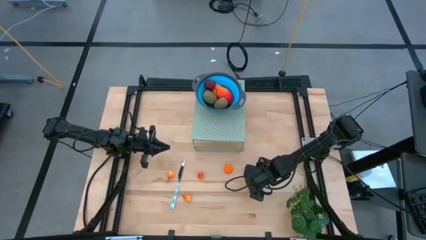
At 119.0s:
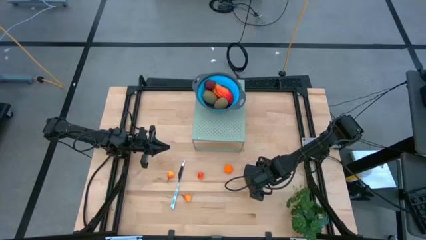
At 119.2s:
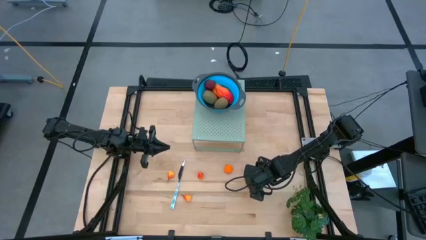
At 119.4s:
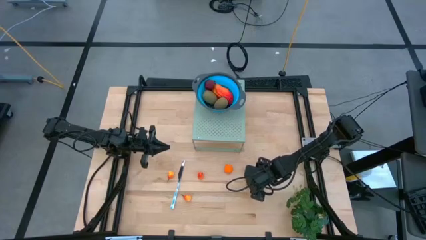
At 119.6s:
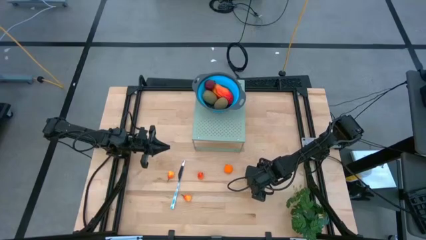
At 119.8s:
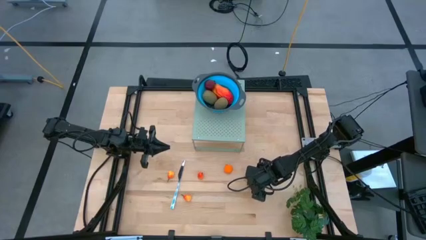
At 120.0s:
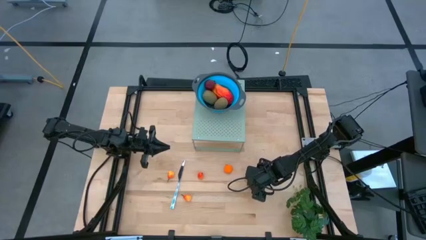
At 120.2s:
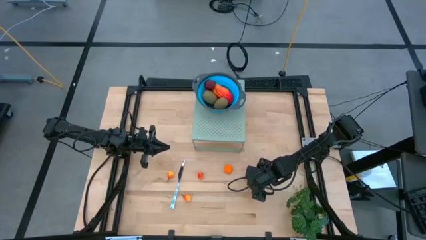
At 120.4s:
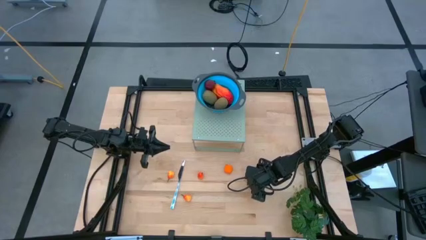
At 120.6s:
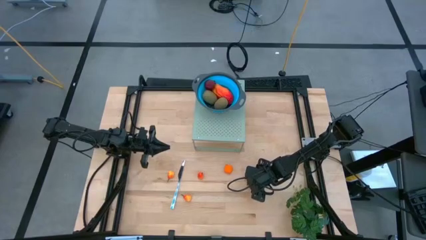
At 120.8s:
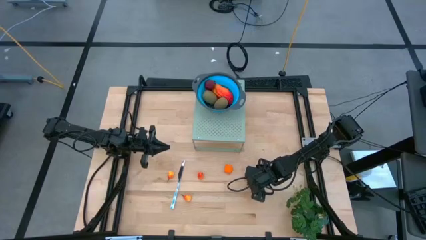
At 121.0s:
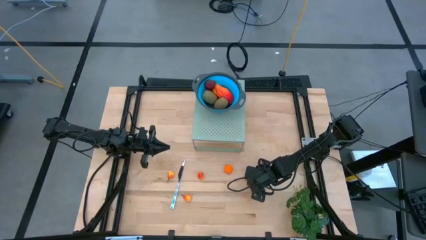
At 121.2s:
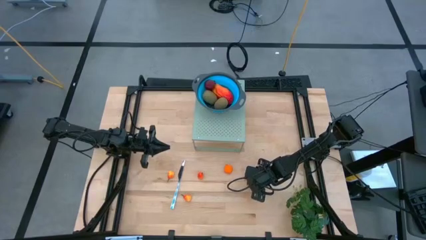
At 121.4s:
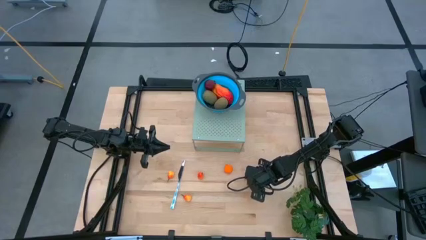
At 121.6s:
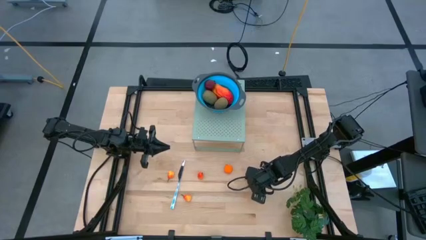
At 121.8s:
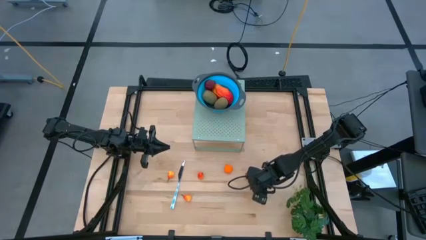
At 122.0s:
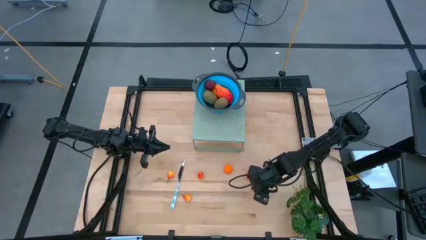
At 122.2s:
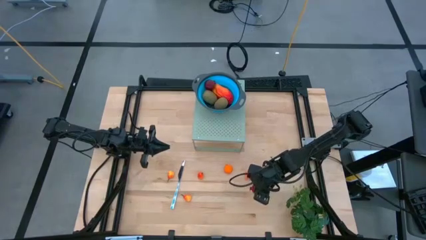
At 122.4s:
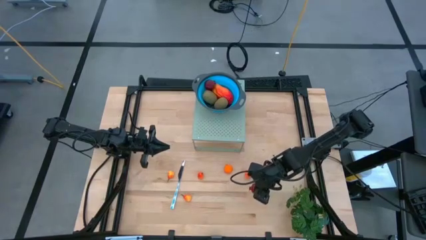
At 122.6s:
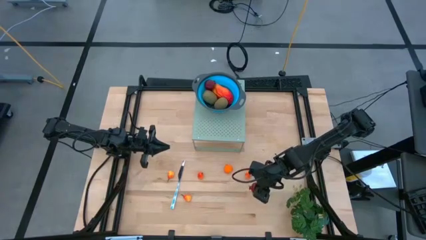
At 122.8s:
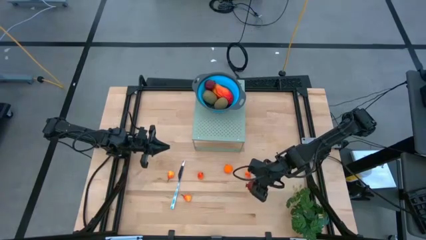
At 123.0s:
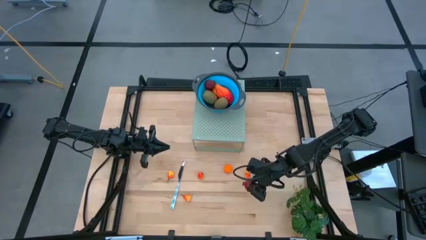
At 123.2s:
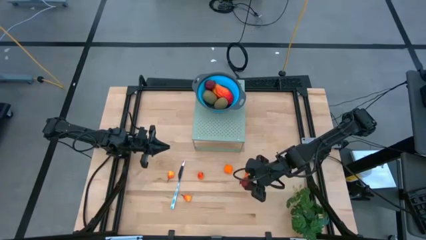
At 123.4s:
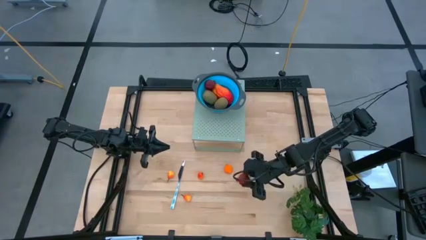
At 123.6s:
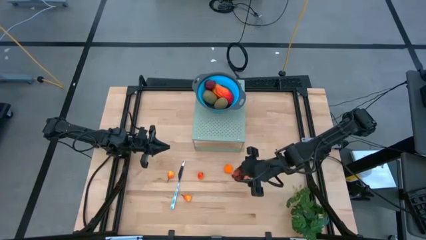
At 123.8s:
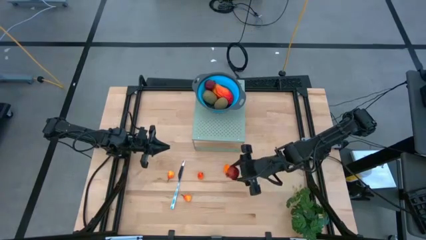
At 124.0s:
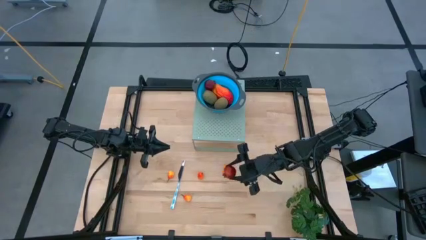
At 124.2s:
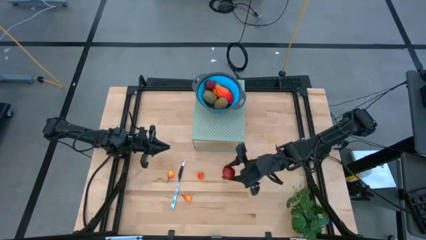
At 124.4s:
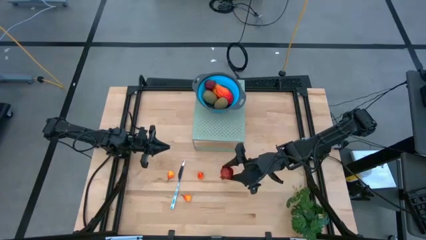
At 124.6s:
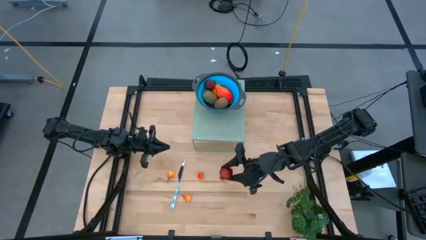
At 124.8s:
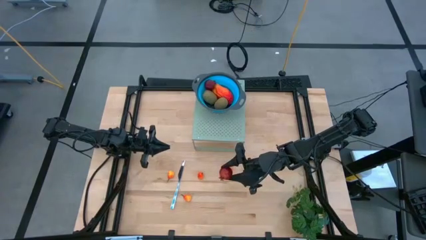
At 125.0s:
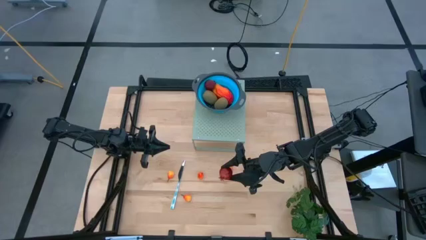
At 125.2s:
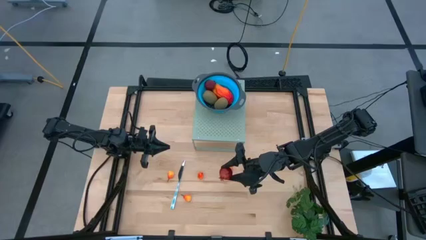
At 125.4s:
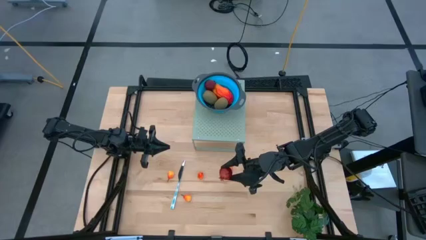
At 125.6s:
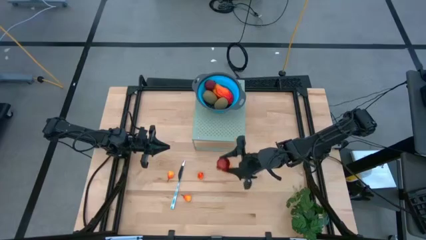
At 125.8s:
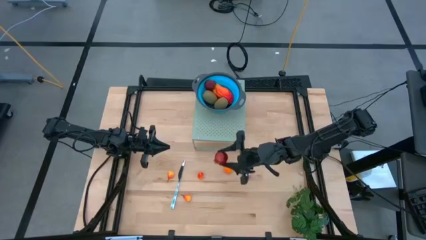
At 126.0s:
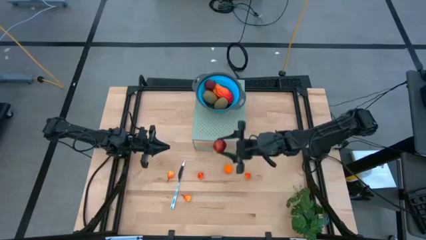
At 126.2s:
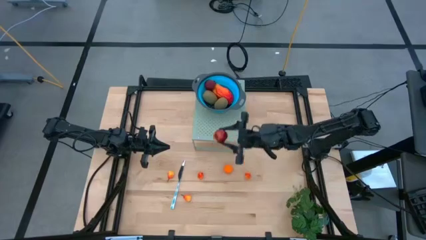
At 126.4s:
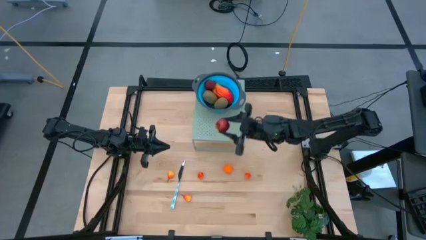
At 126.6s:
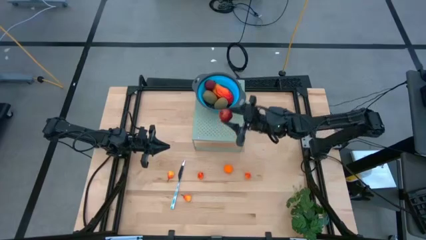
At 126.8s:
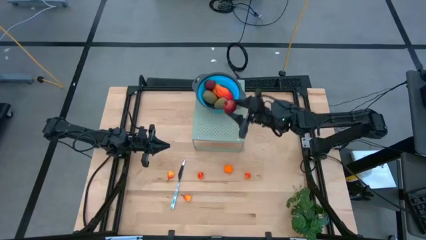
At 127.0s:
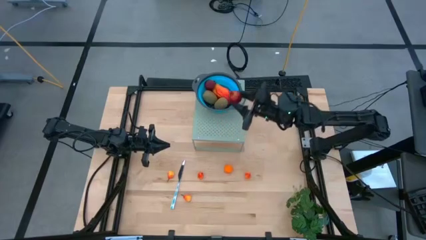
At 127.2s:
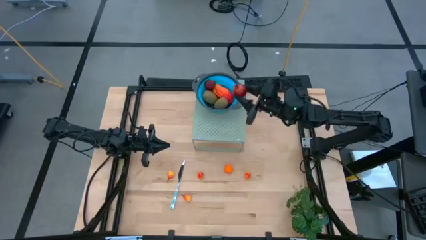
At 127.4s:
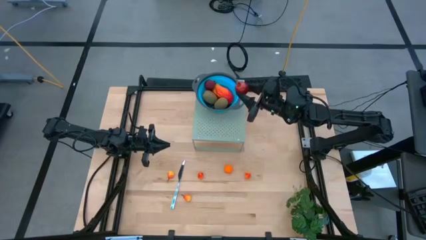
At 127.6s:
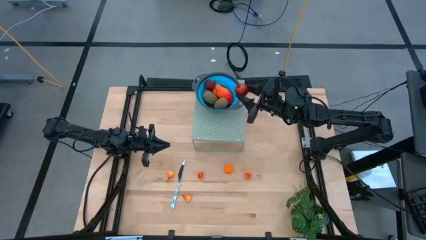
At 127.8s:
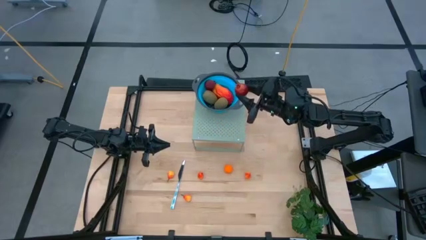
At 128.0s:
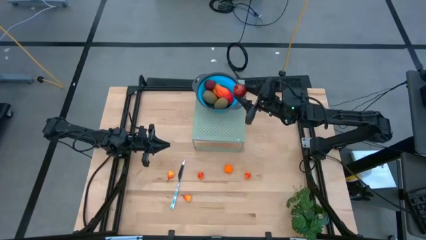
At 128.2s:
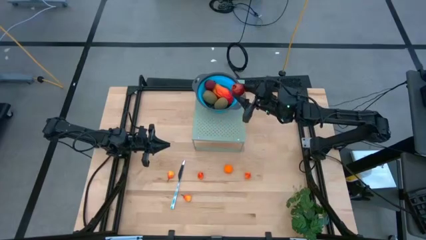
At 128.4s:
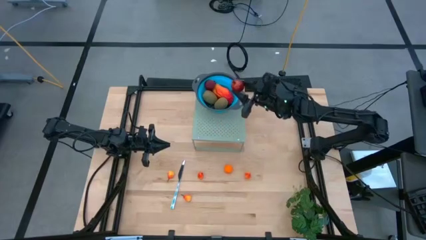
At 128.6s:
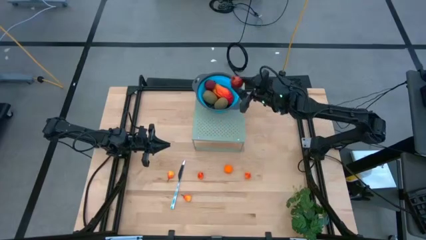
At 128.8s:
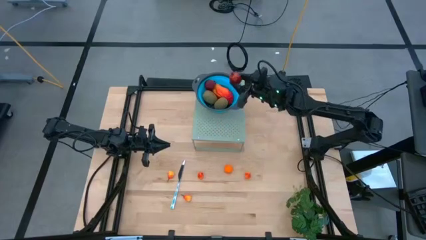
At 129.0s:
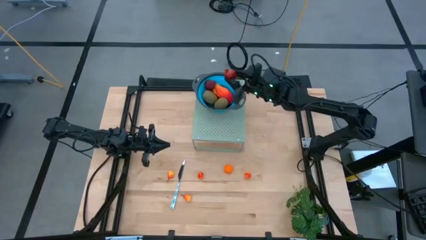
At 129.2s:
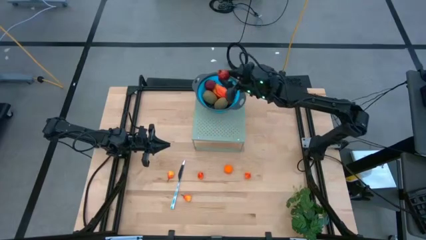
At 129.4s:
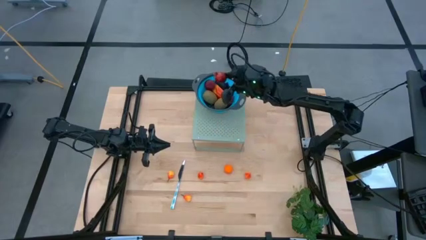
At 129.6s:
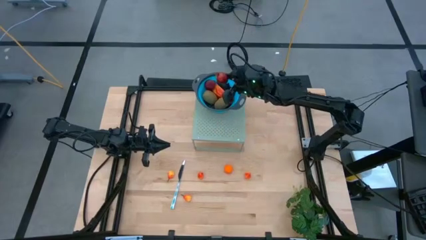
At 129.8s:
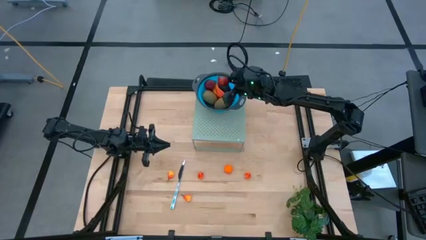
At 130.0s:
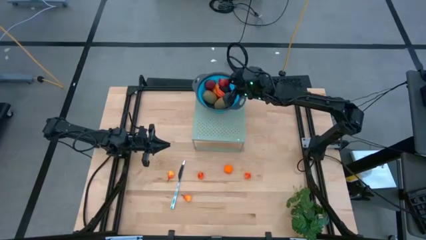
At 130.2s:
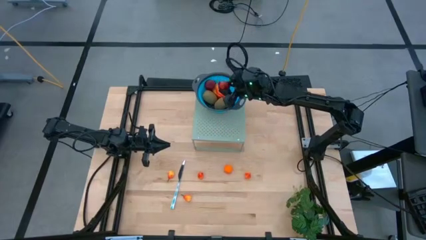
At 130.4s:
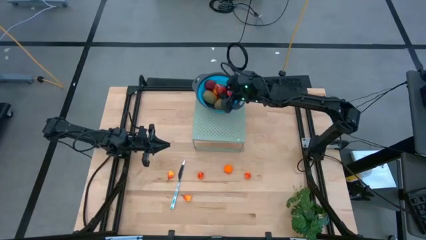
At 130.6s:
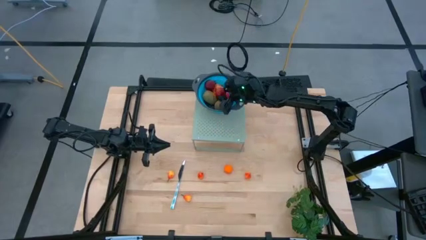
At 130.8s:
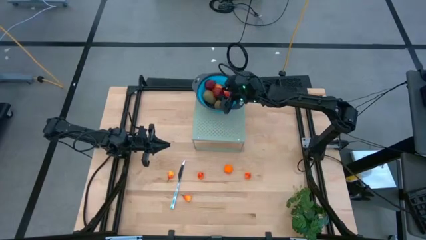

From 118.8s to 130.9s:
Task: Pick & Place Fruit
Put the pomegranate into the blue strainer bowl on the shelf

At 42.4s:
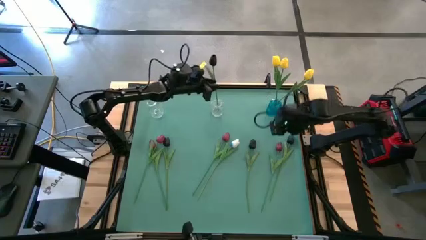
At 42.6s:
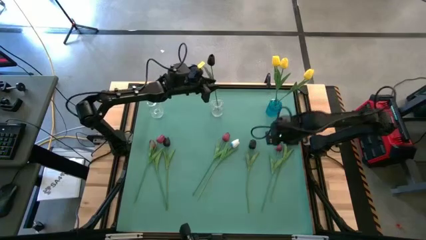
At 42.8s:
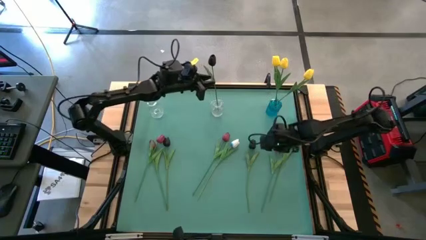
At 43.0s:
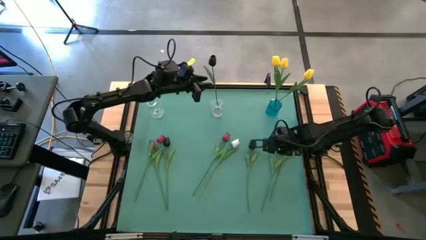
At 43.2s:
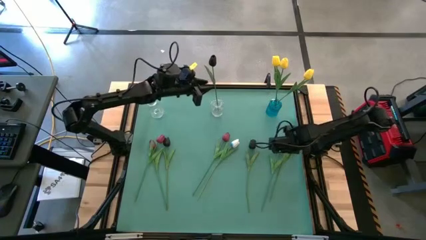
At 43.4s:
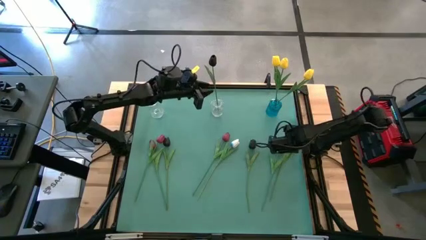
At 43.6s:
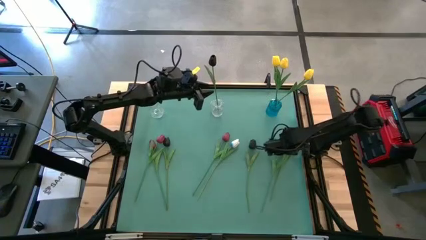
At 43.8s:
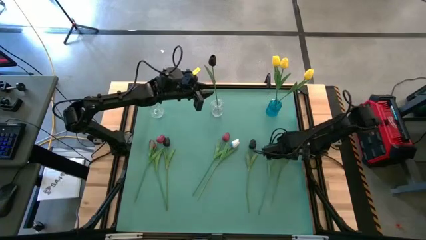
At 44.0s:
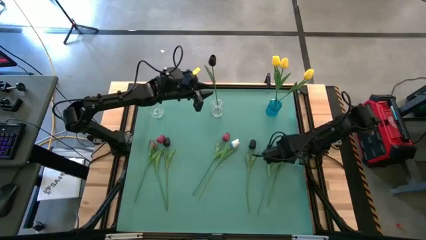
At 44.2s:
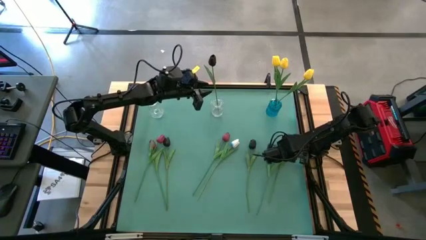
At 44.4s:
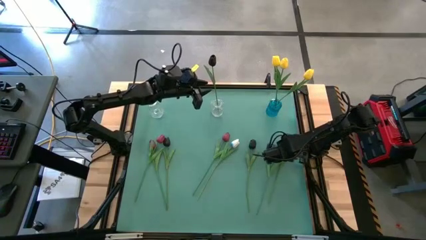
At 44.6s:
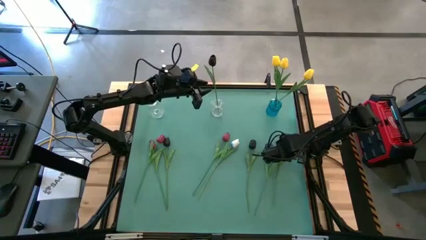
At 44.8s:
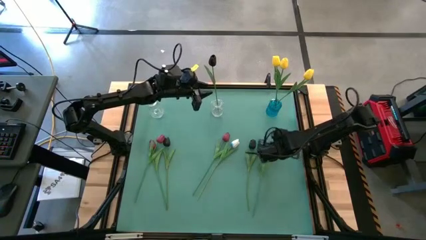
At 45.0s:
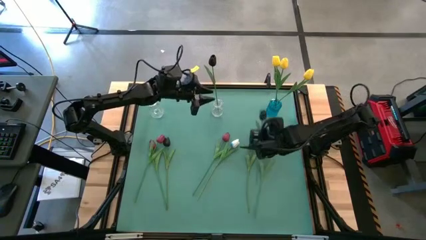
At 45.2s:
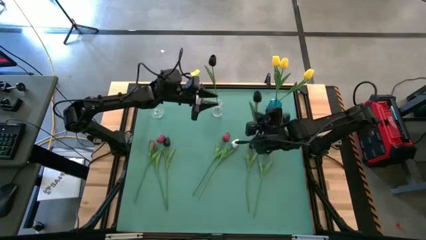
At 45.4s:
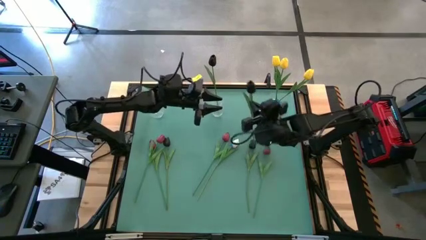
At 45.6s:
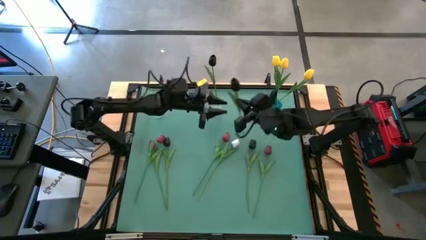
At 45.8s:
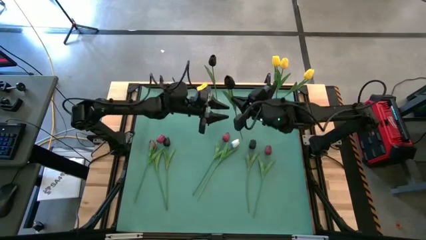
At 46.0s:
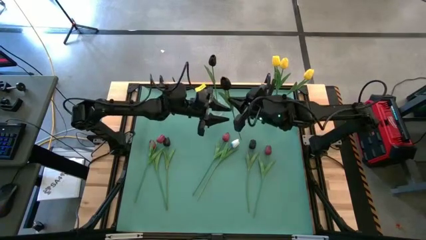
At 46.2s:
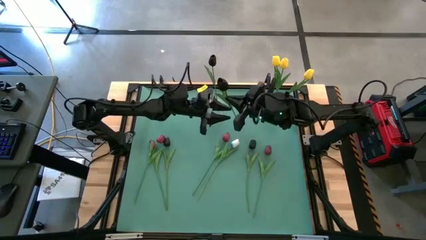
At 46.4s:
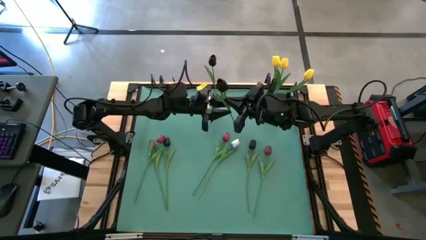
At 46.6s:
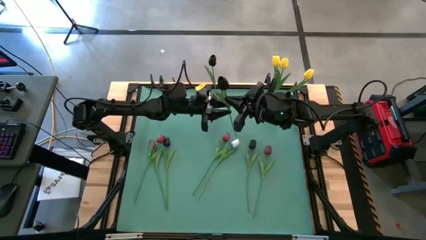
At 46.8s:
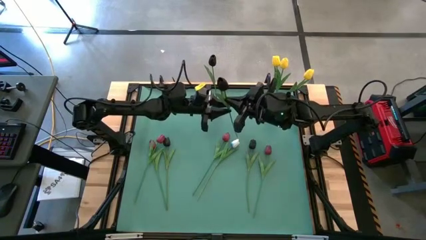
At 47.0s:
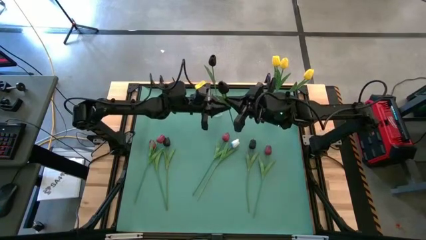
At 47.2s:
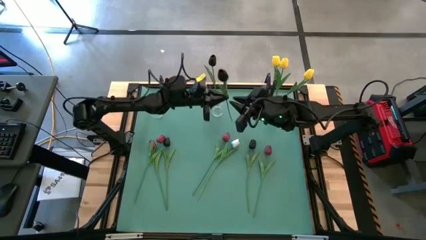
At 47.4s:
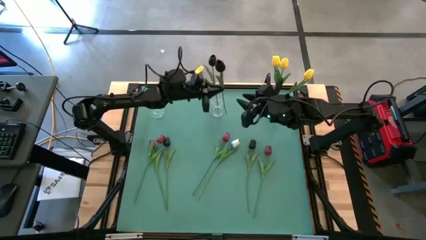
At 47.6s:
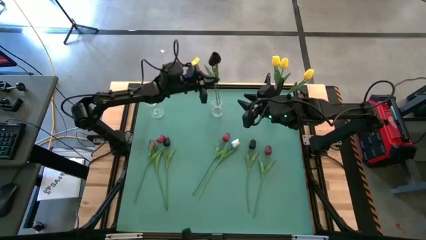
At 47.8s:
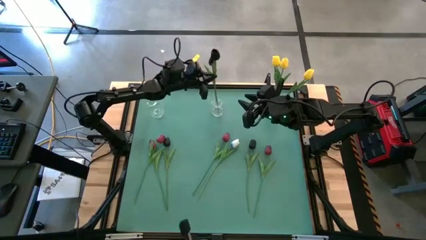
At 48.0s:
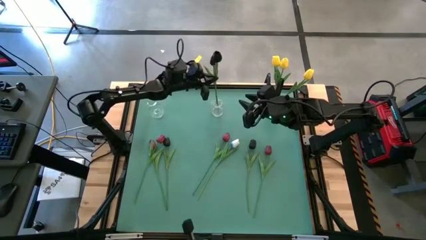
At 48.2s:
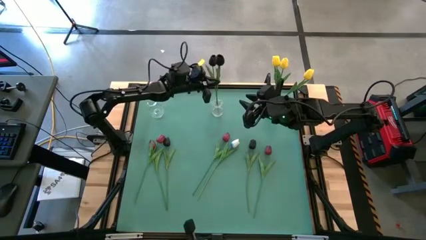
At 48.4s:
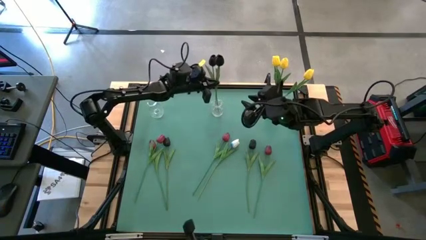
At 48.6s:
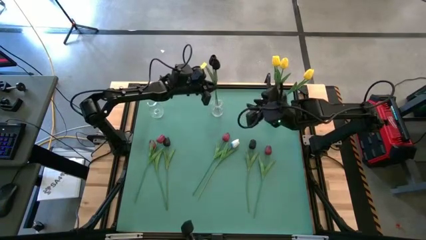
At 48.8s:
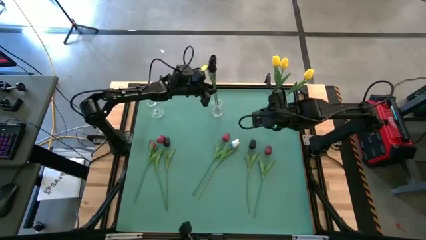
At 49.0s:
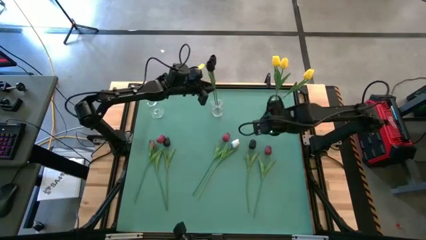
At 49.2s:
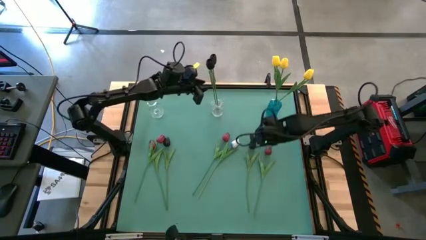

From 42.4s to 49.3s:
Task: Sort flowers into vase by color
Put the black tulip into the right transparent vase
